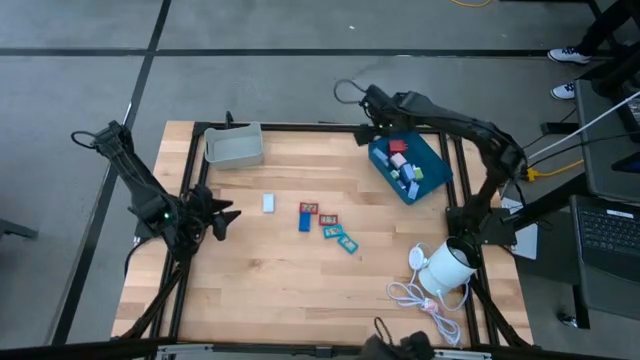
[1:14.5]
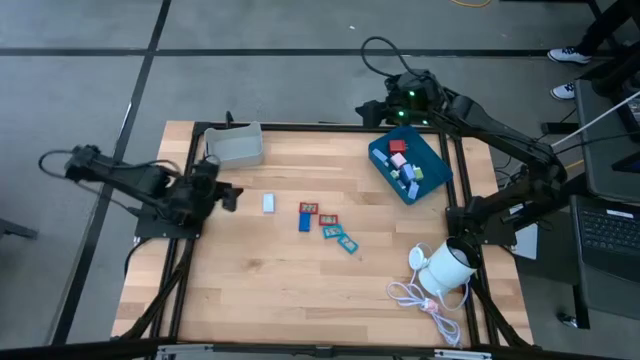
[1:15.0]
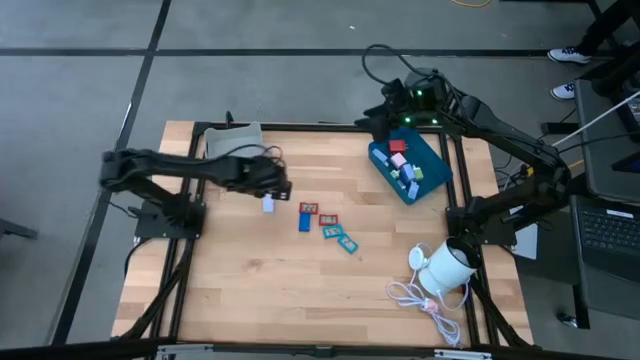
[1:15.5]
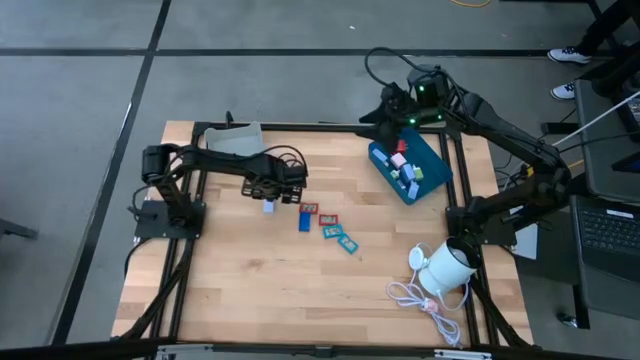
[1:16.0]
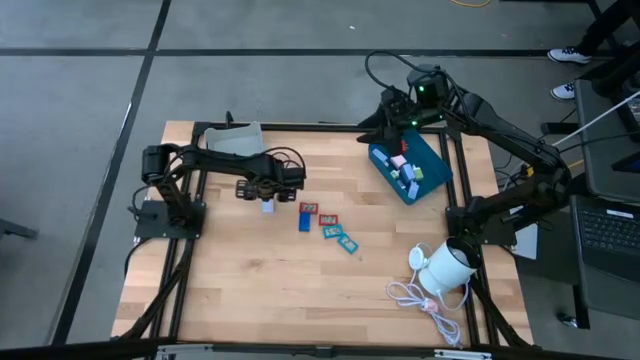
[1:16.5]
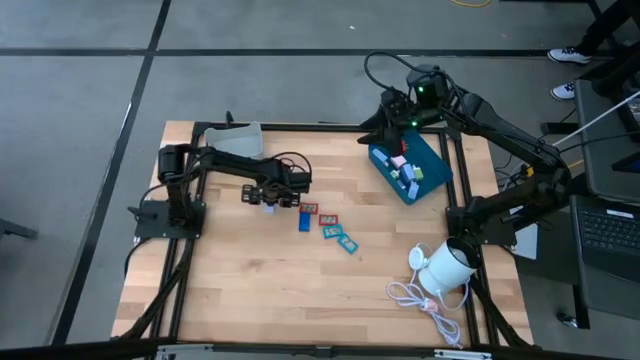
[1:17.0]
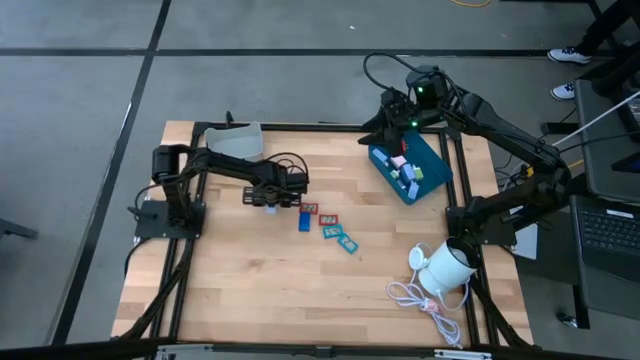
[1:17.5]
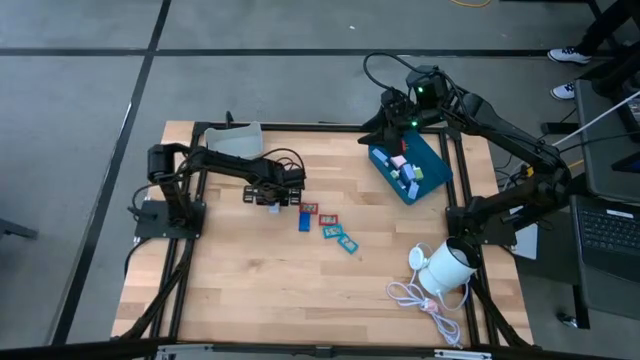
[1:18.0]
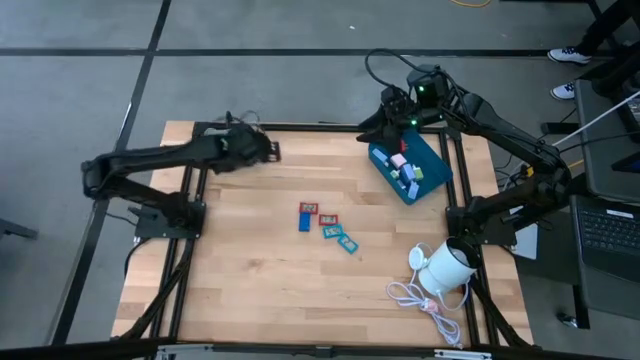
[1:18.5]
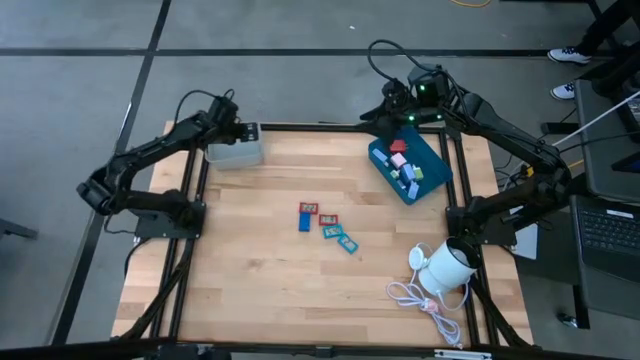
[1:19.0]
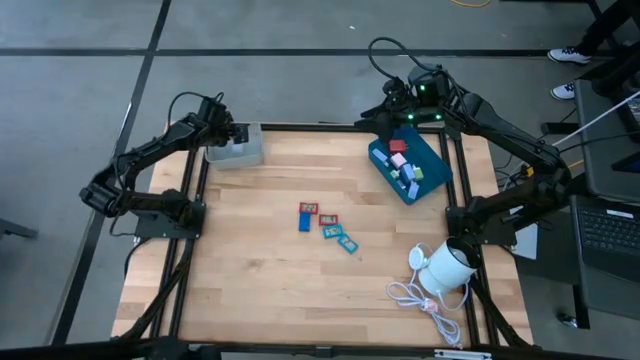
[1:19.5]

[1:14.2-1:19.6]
Task: Pick & Place Office items
Put the white digital timer into the gray bin

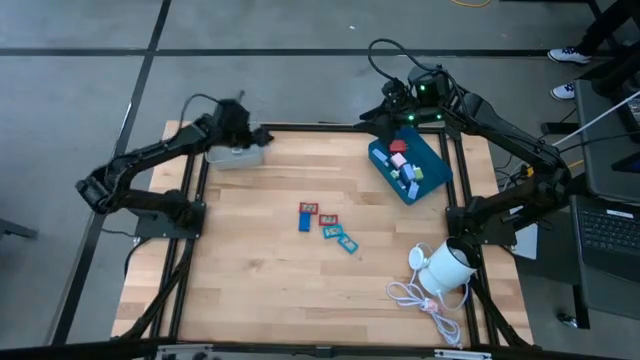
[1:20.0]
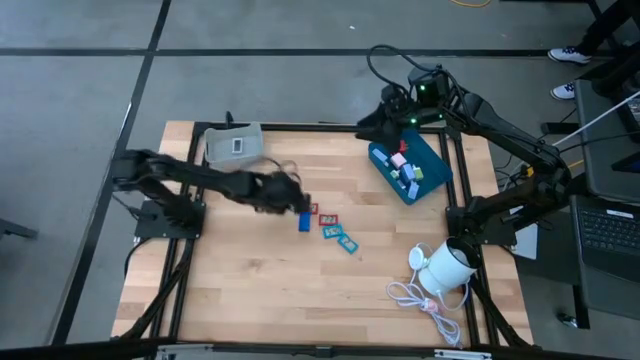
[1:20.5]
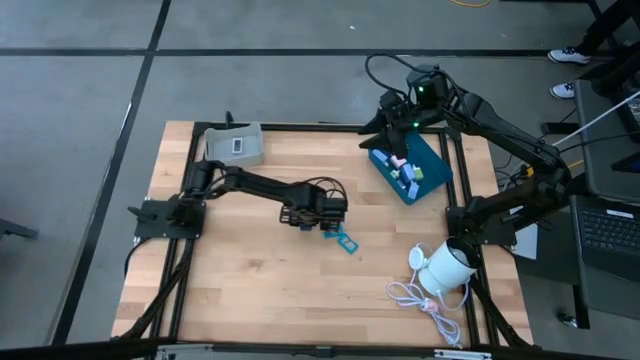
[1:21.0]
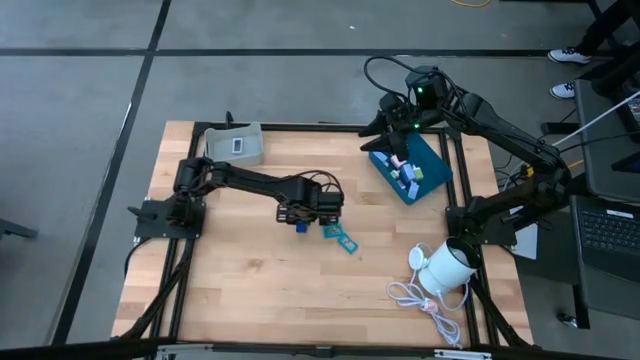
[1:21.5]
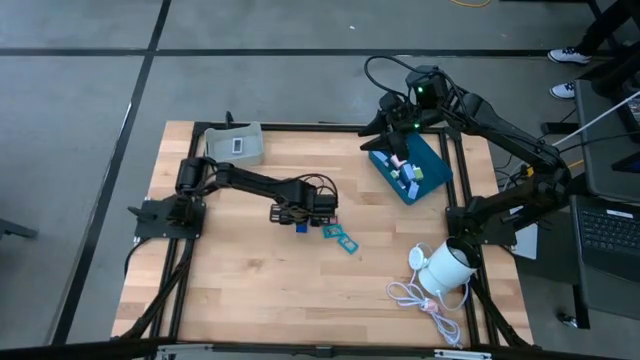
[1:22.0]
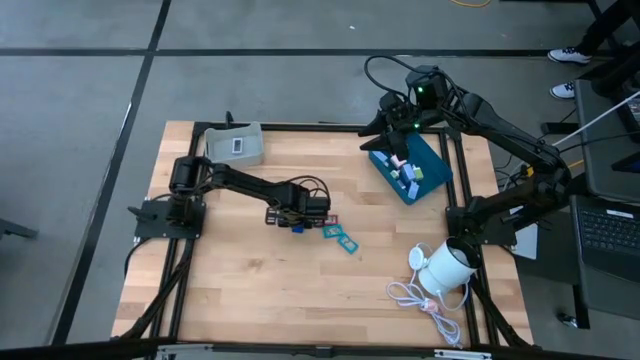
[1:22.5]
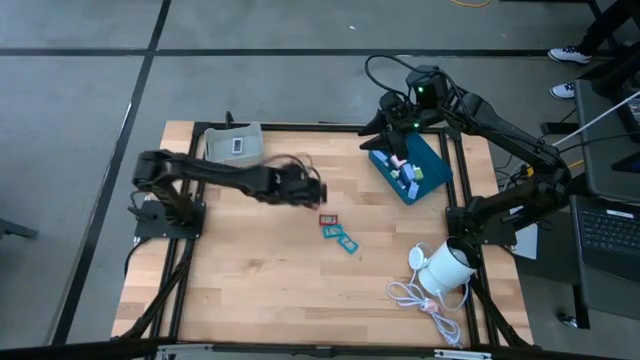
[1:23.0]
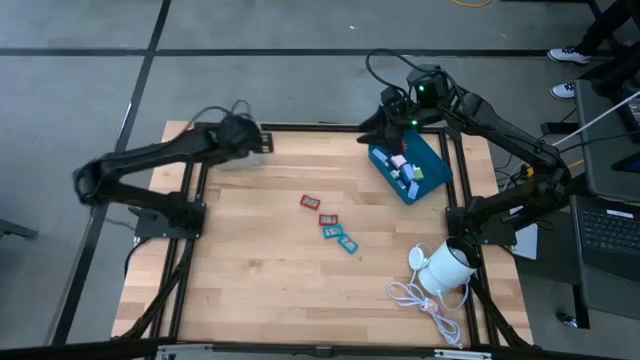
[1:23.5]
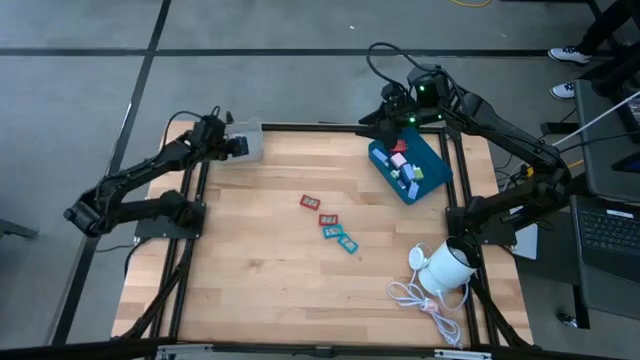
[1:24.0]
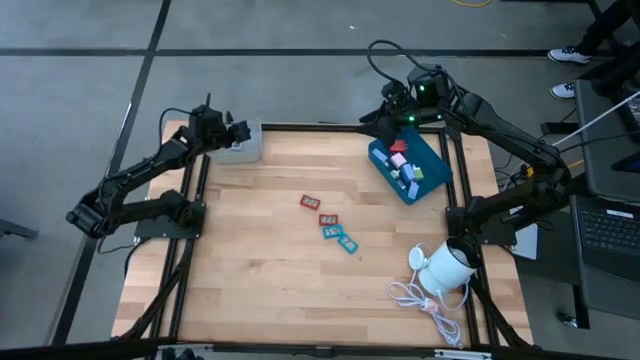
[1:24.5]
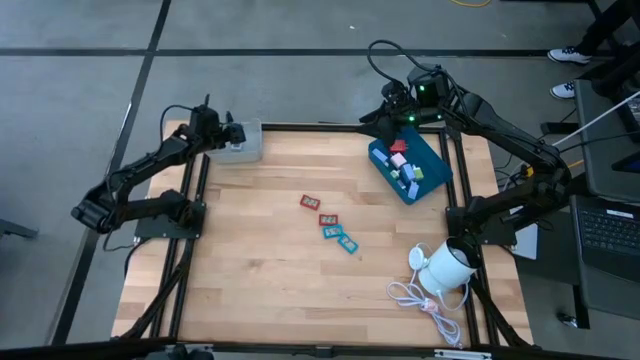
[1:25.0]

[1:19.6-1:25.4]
Put the blue digital timer into the gray bin

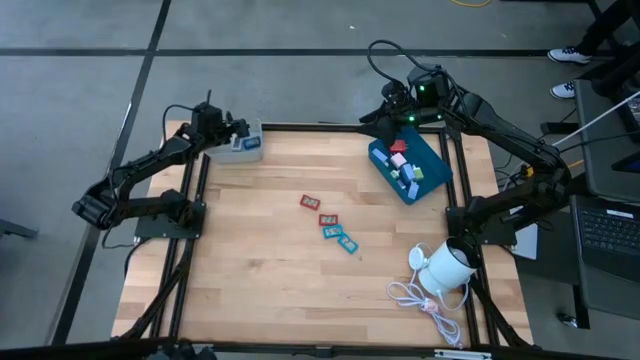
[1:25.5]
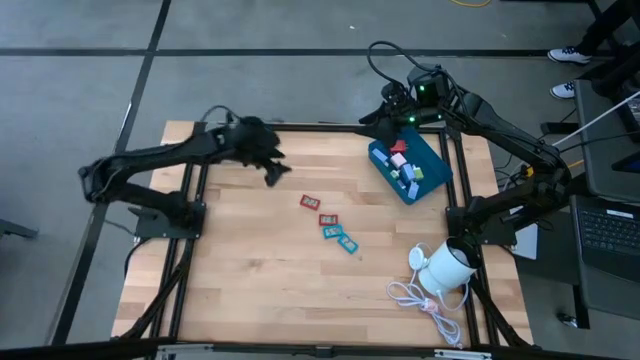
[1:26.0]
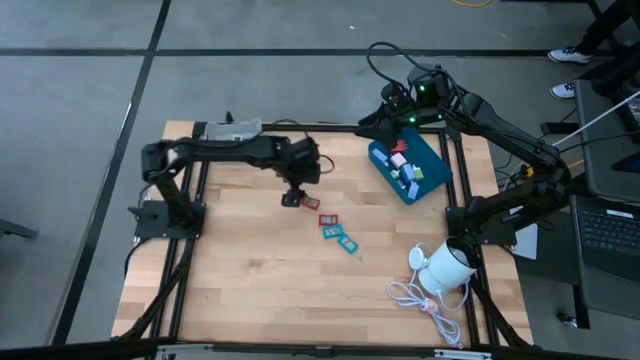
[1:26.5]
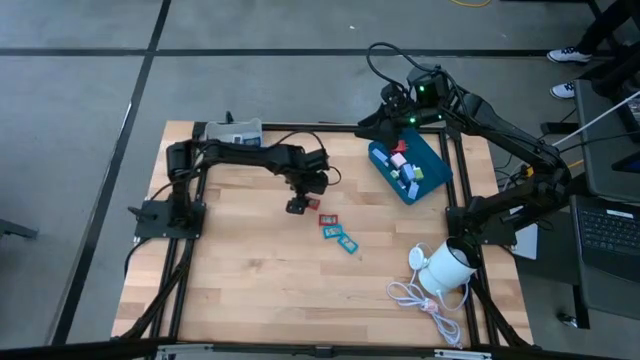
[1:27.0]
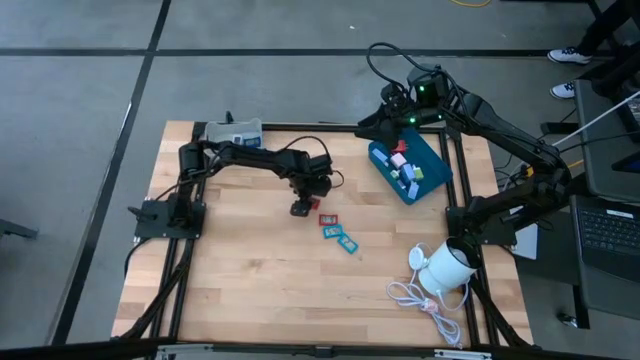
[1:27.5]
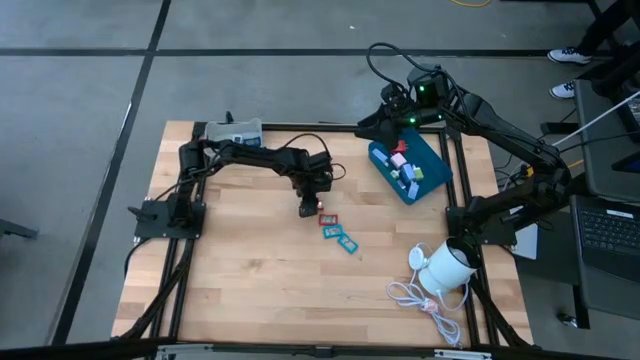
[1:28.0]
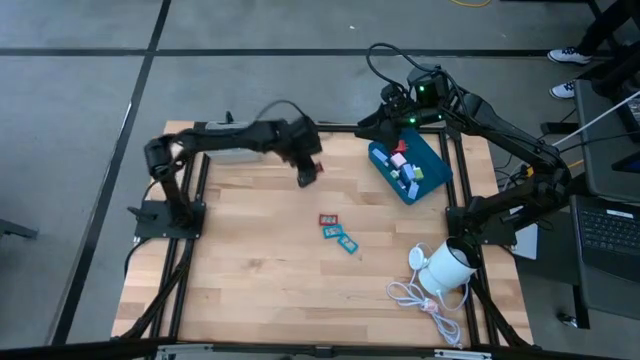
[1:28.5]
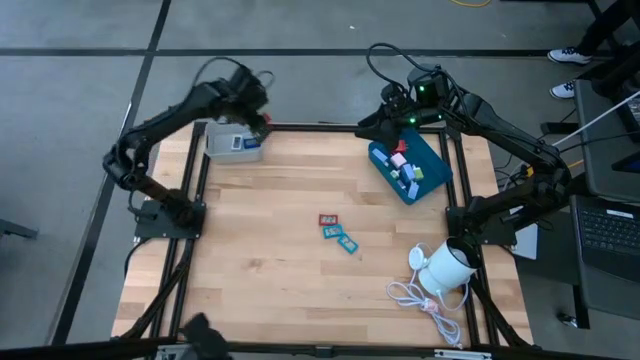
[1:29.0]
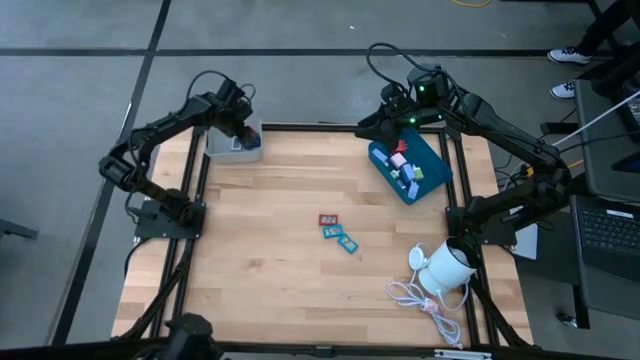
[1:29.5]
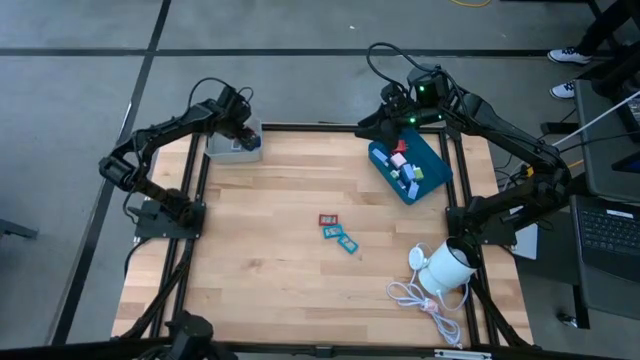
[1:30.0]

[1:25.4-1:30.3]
Put the top red digital timer into the gray bin

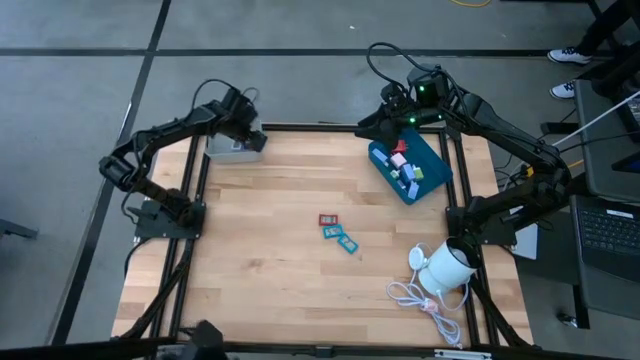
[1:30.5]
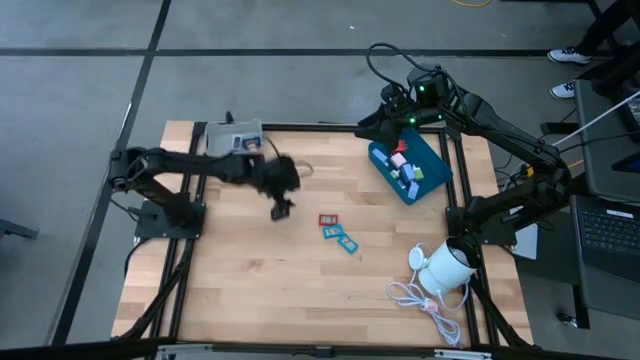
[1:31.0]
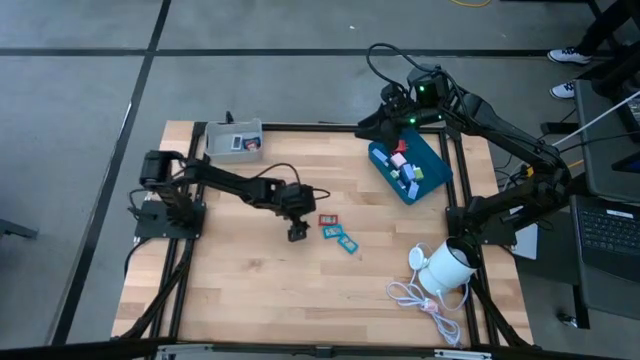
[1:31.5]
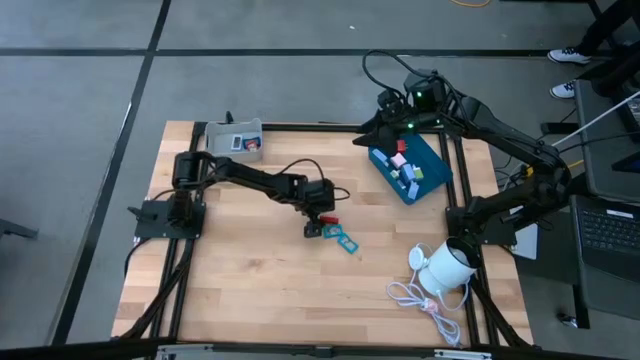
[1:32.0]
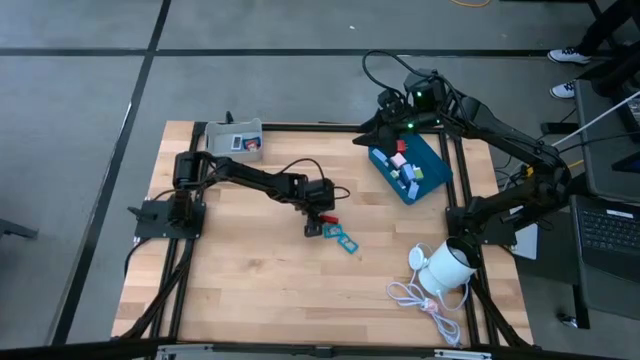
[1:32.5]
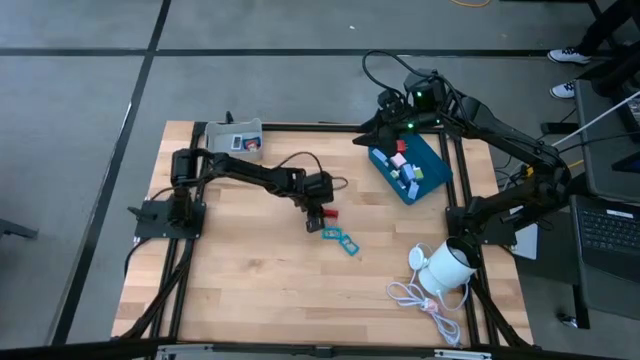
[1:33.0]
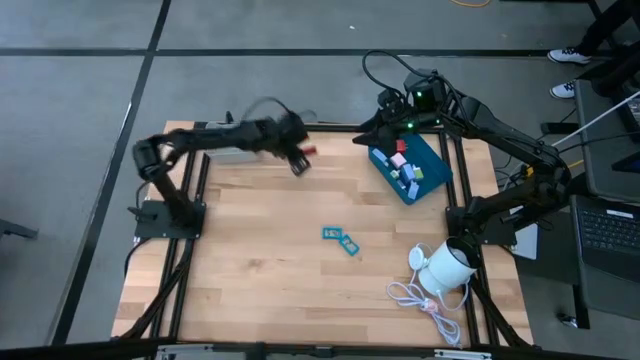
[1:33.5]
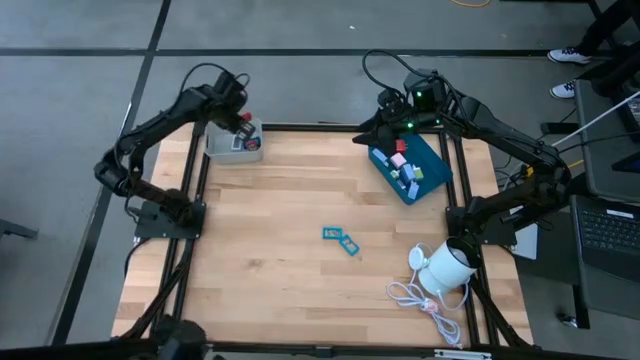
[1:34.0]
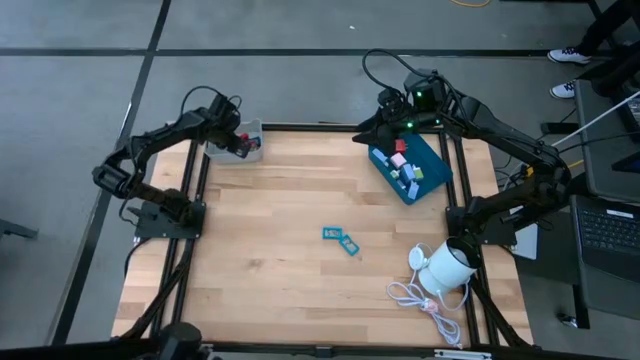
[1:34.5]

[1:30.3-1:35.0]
Put the red digital timer into the gray bin

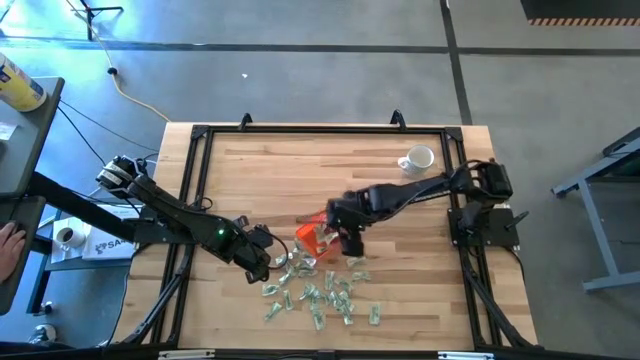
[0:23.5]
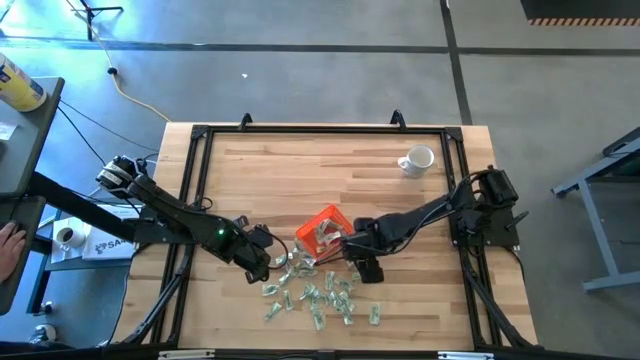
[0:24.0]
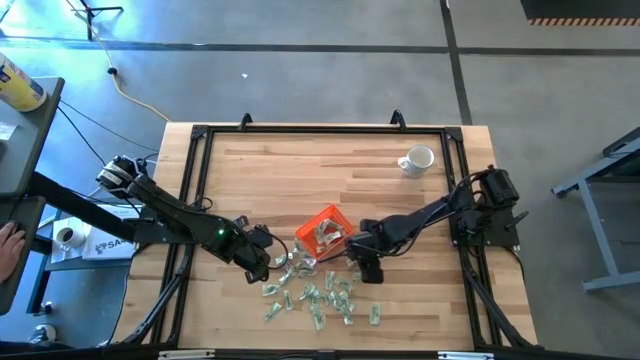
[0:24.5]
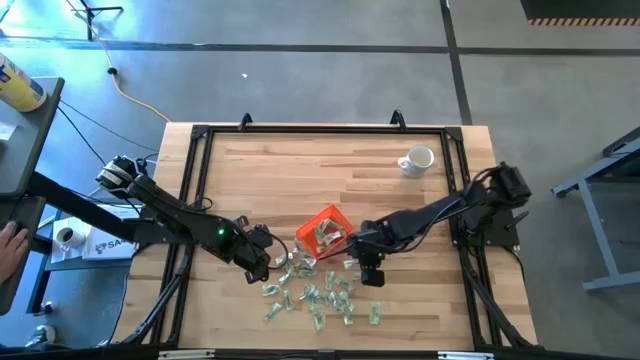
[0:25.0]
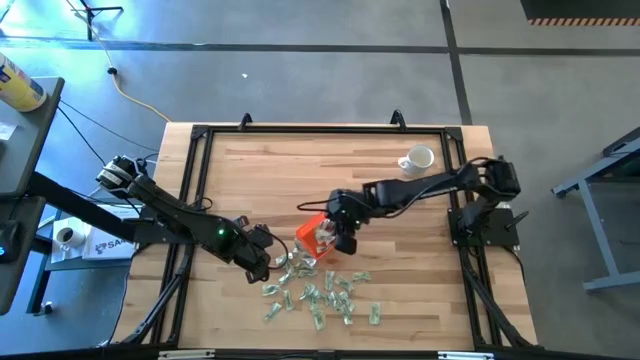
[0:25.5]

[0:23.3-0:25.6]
Task: Pick and place Stevia / Truvia into bins
Put the stevia packet into the orange bin
